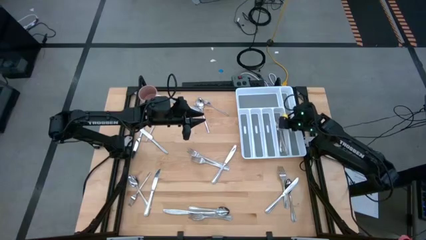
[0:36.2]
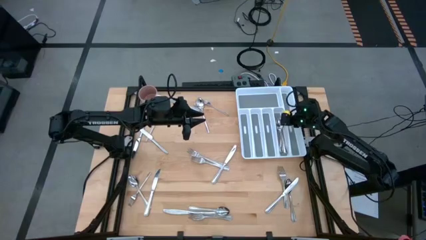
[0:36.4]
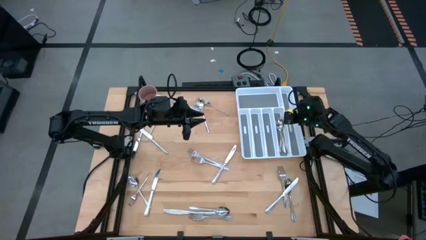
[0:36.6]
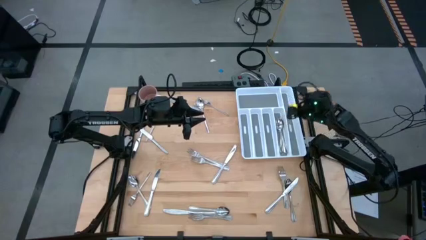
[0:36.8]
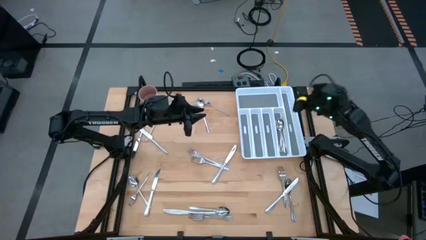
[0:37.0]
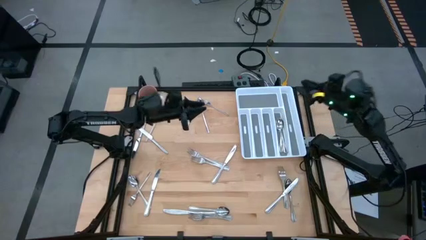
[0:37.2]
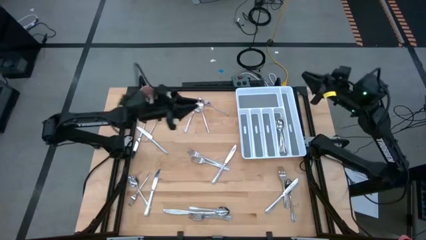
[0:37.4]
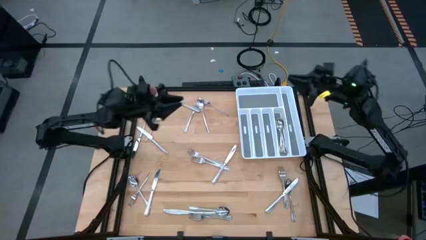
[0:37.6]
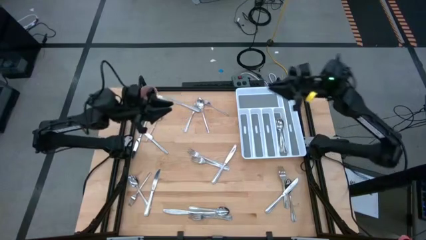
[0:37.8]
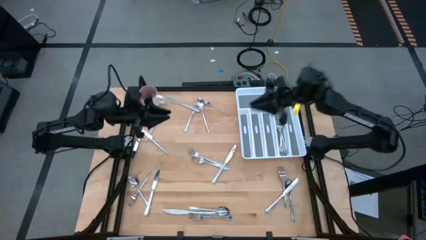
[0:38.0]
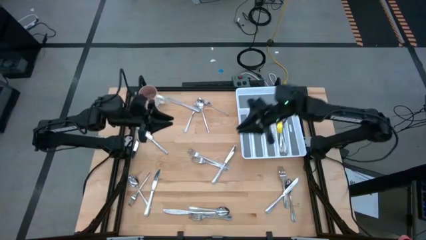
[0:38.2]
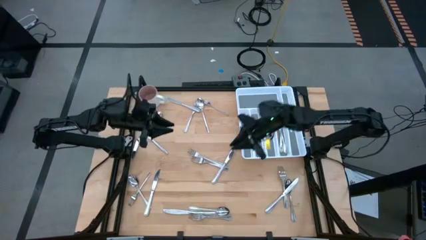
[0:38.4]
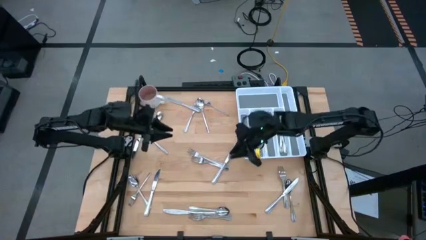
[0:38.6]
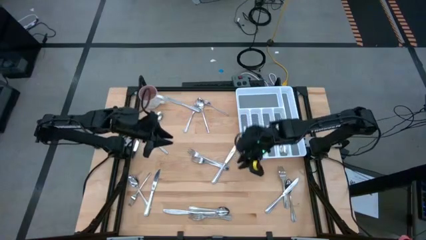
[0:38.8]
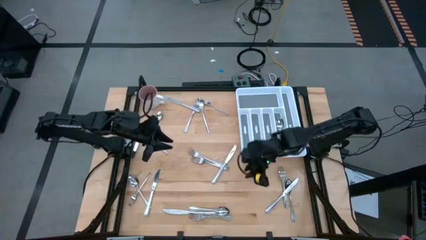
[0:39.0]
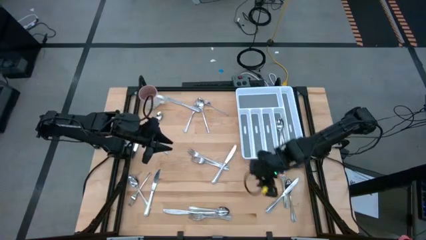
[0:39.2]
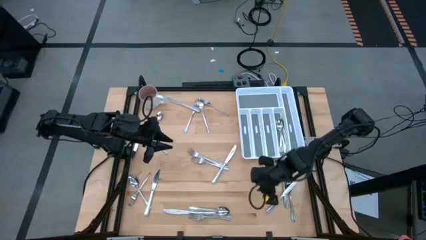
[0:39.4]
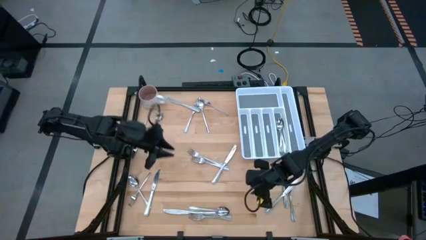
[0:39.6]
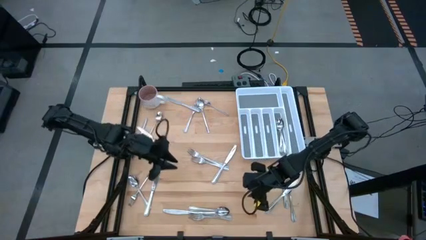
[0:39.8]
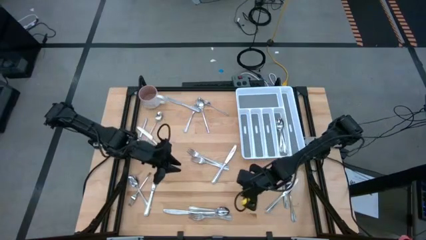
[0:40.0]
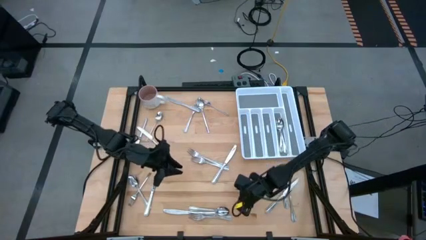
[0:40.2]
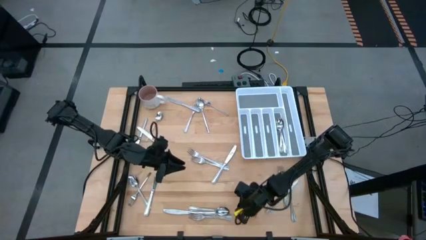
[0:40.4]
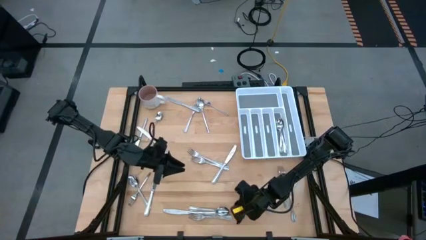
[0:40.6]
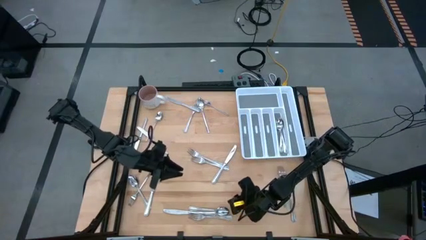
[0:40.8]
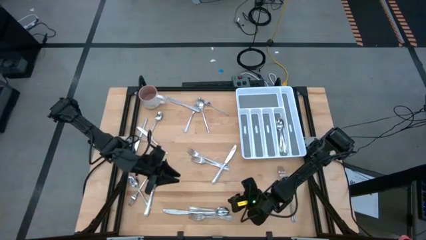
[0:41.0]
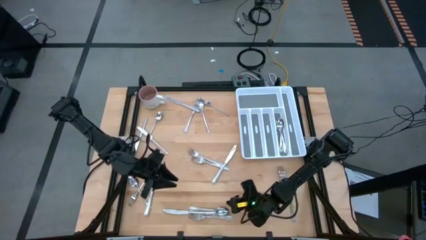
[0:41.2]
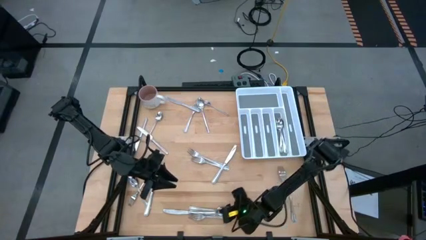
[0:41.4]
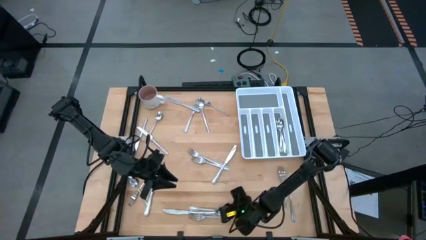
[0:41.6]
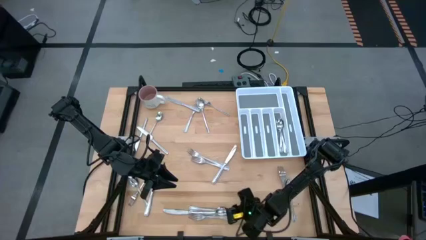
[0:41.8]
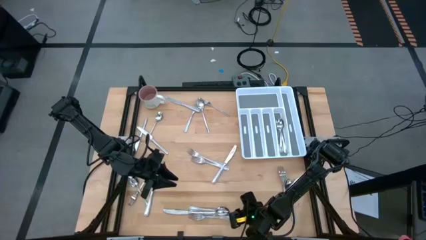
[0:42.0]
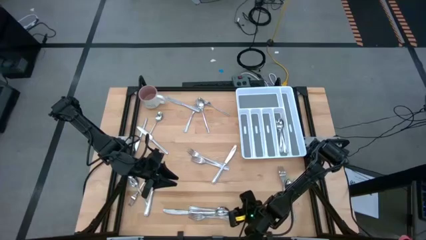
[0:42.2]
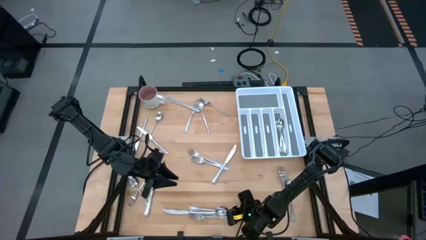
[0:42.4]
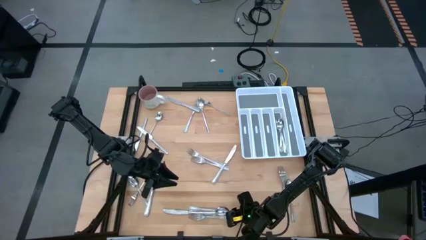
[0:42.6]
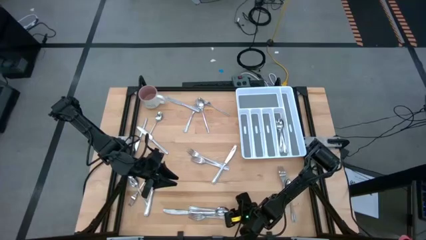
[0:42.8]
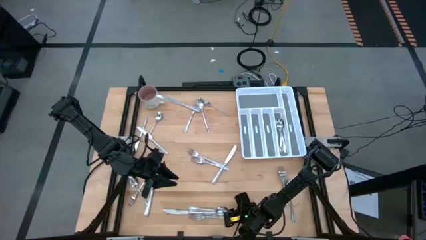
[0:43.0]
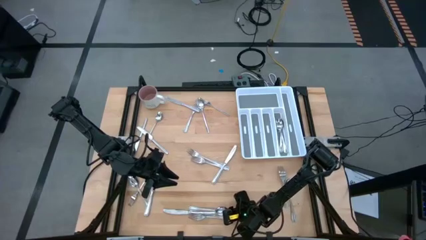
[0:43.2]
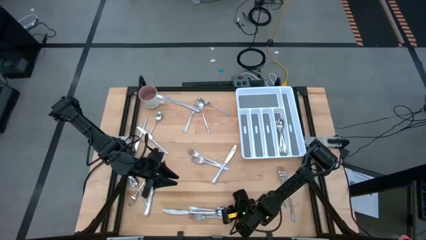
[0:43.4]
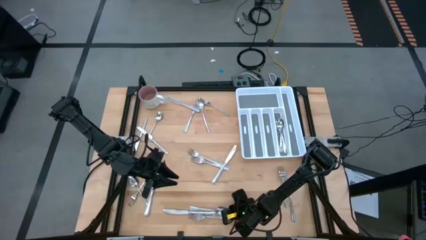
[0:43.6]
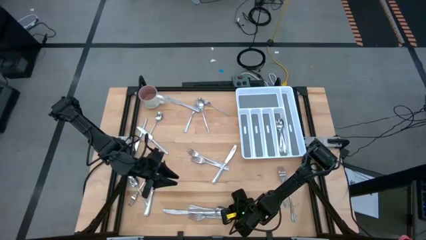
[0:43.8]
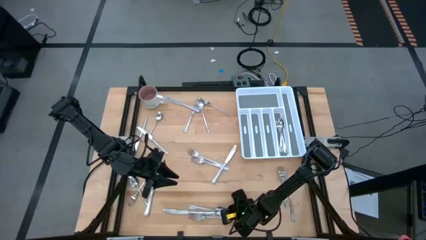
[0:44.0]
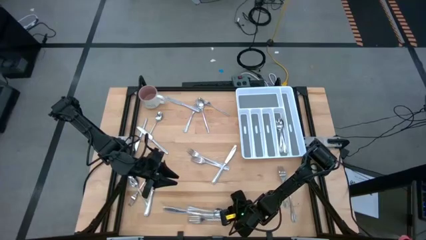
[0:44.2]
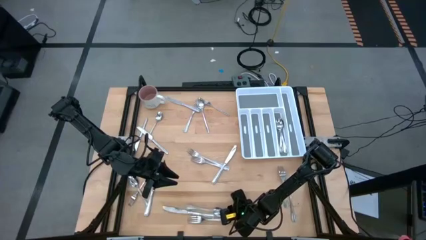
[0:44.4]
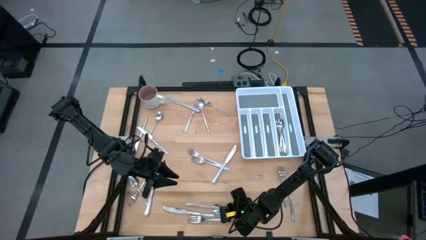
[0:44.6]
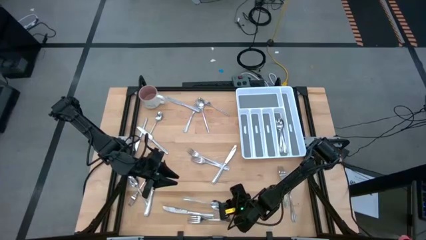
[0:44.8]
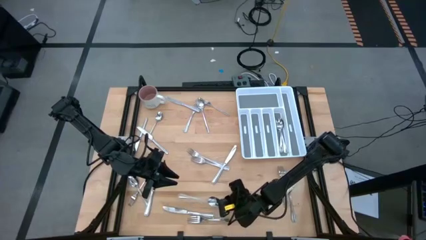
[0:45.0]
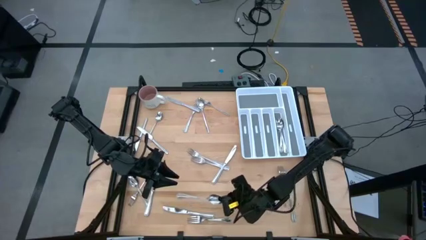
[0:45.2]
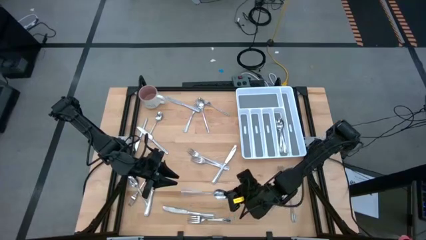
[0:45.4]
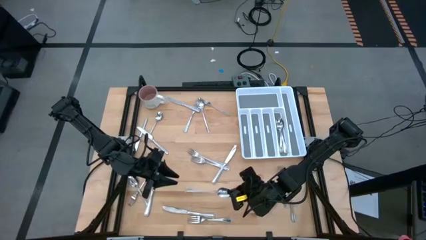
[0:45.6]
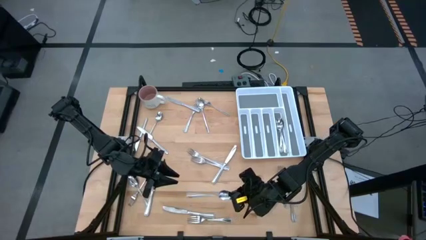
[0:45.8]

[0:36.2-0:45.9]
Task: Sort silverware
Put the silver spoon into the silverware tray

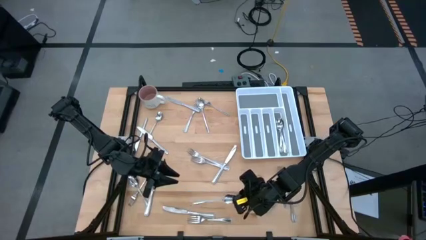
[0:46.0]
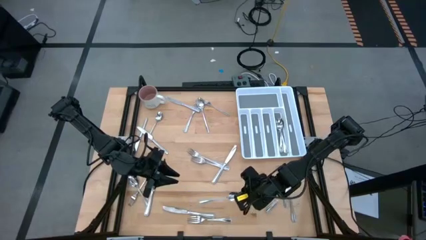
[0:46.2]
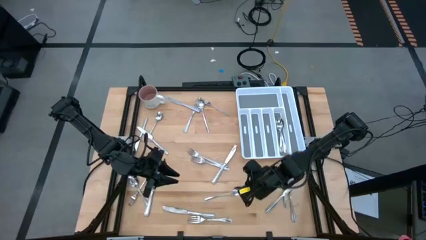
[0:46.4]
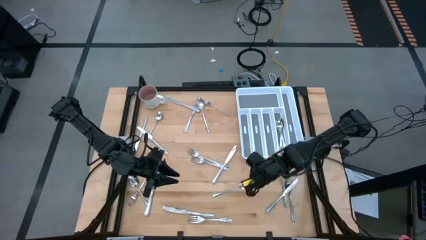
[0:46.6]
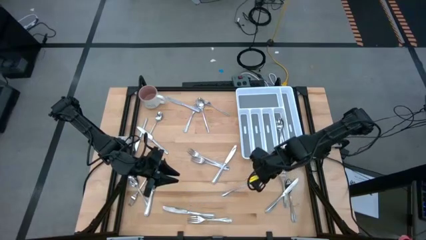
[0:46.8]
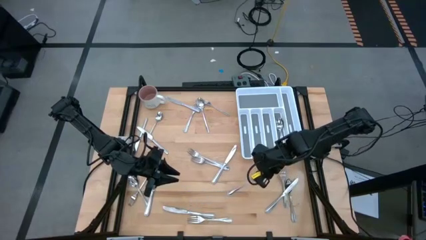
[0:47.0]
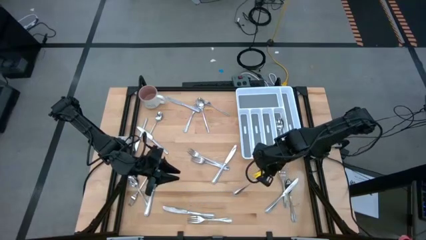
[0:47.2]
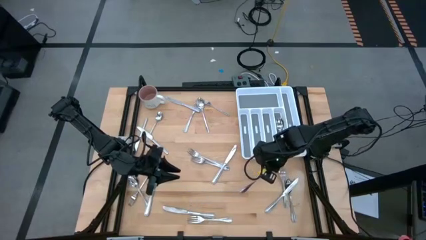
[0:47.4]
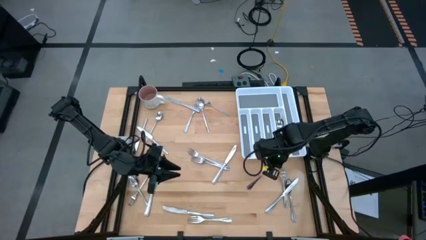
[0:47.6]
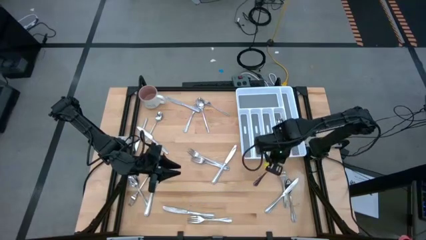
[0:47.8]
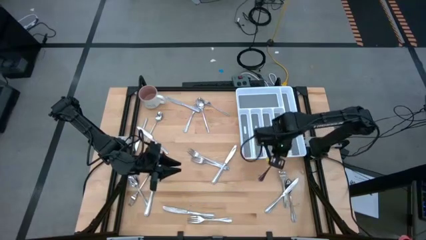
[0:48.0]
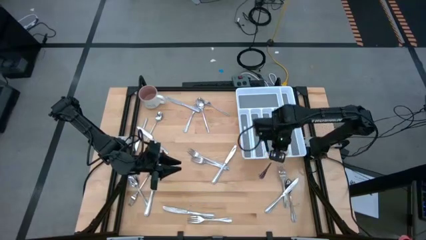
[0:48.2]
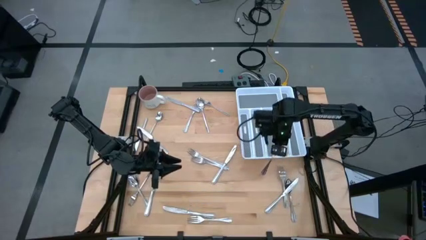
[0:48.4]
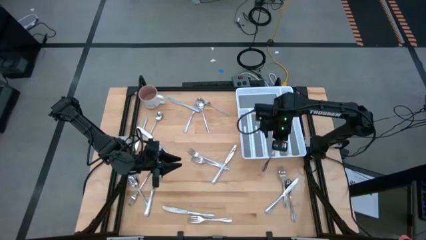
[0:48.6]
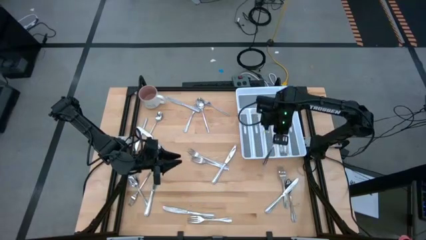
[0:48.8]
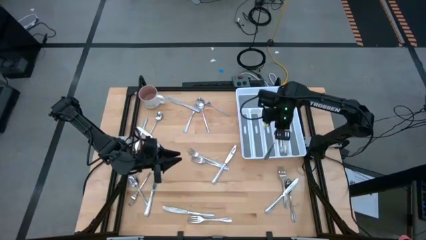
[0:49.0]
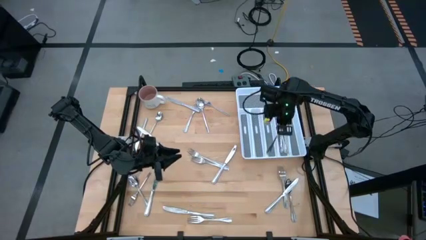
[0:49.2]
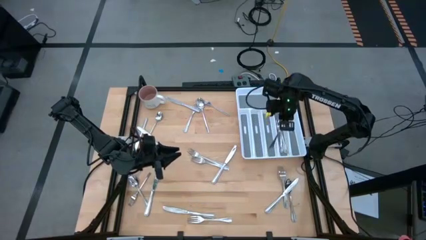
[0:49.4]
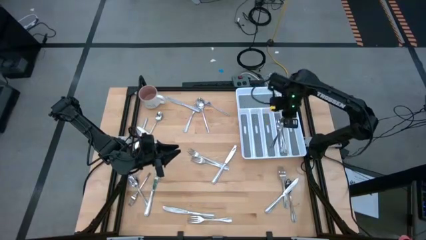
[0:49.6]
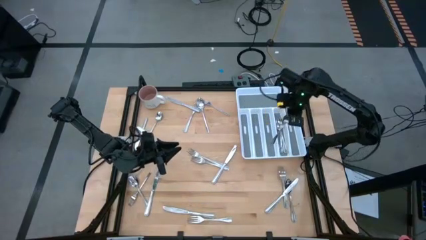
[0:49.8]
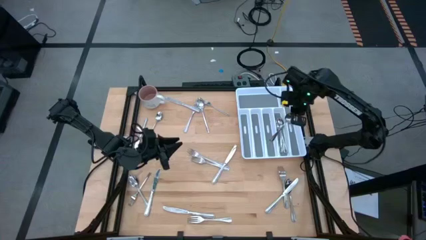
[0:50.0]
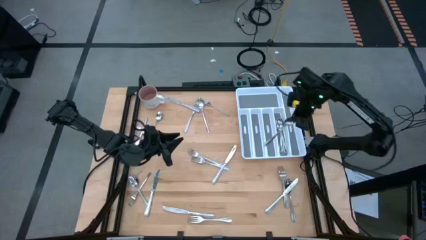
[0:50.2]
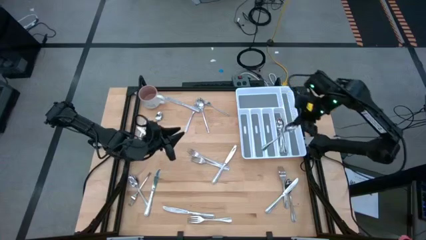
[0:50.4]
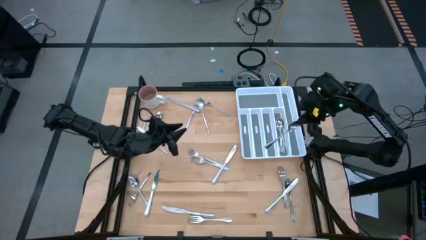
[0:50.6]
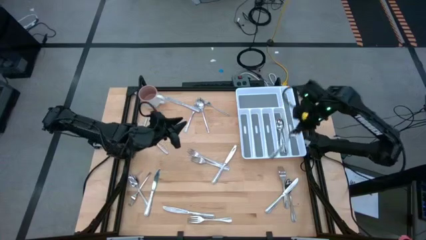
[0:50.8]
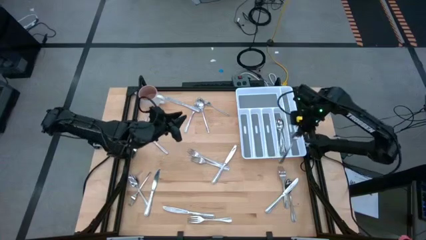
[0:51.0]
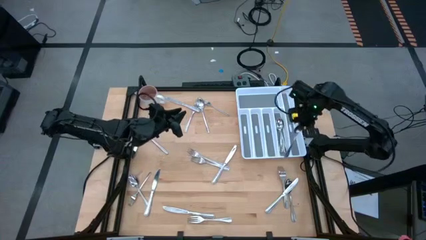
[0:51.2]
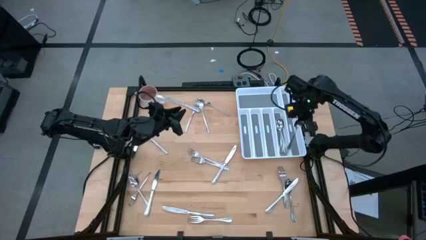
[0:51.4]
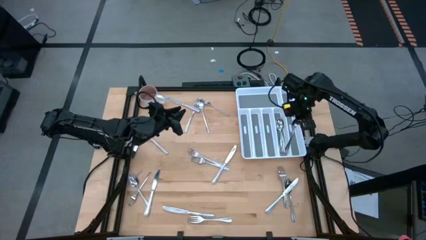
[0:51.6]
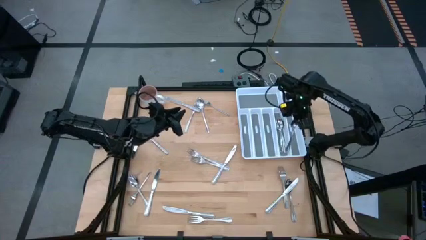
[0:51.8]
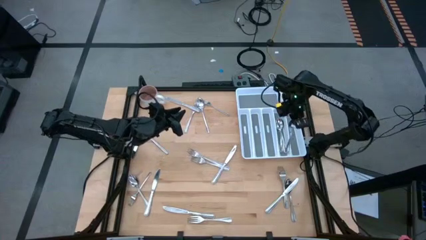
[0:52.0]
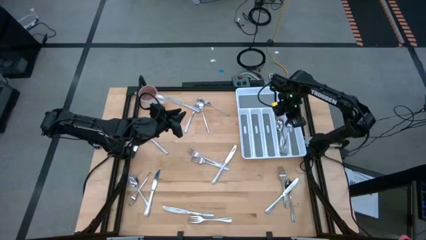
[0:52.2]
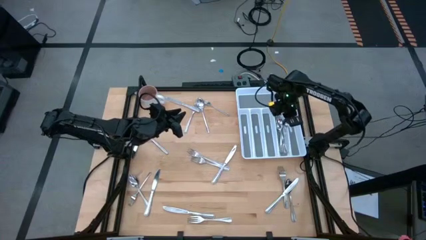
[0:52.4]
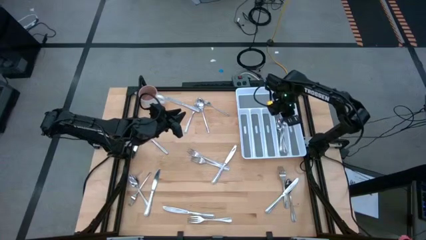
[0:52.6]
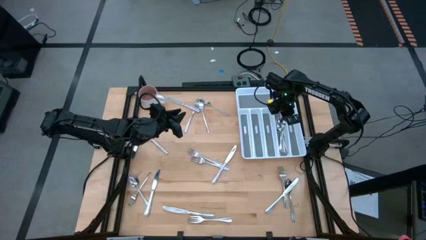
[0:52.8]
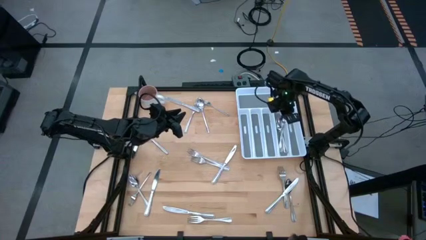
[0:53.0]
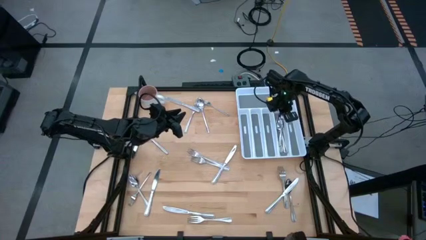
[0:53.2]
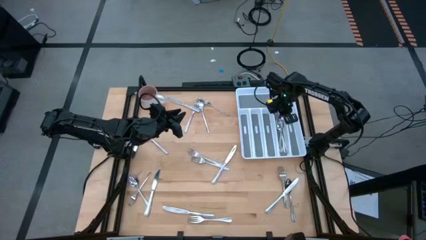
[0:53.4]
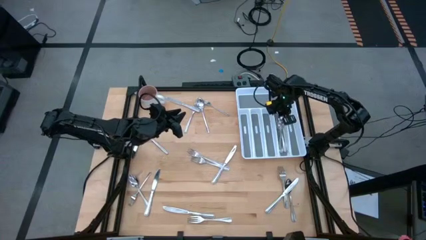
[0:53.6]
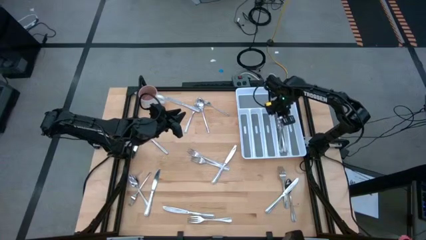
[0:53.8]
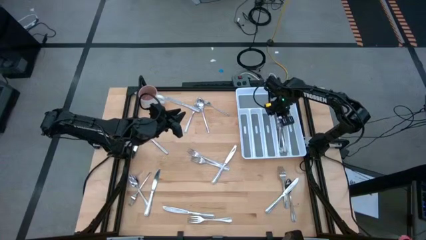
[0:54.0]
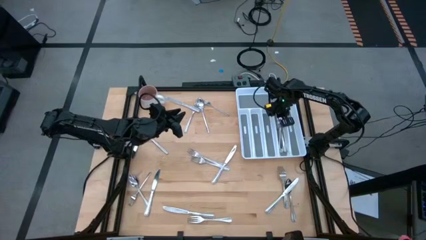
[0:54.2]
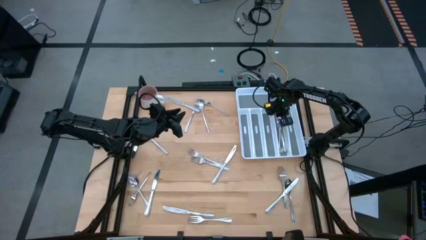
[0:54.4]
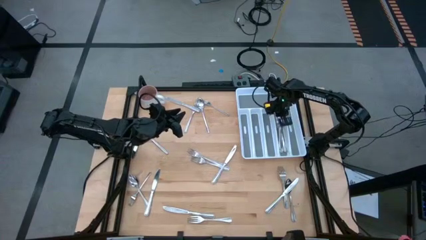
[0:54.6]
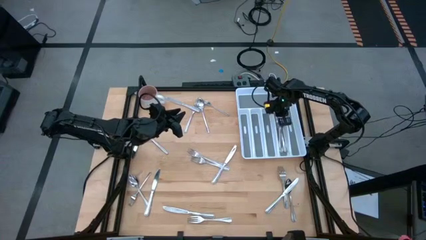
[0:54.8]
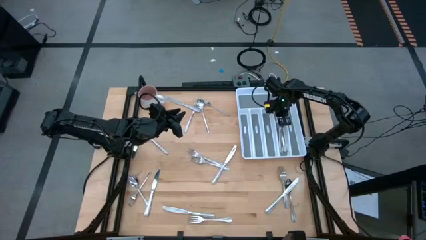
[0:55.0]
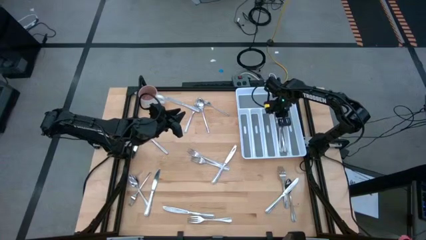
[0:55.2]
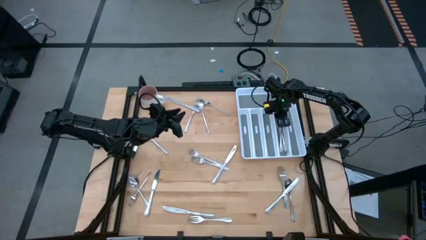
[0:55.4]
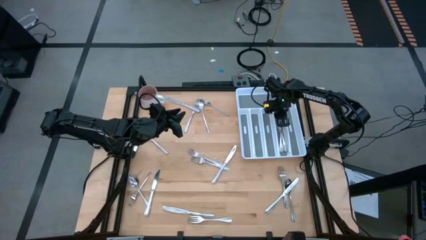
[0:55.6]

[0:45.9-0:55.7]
Put the silver spoon into the silverware tray
